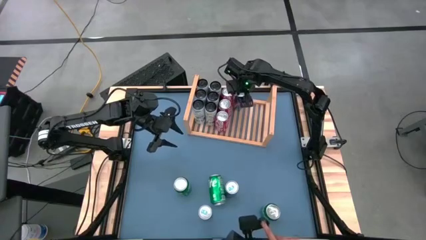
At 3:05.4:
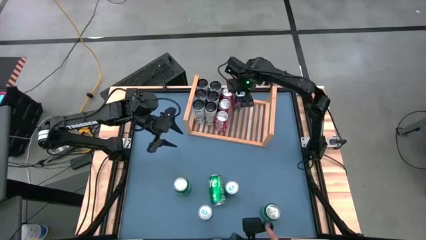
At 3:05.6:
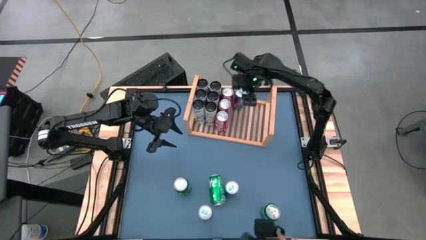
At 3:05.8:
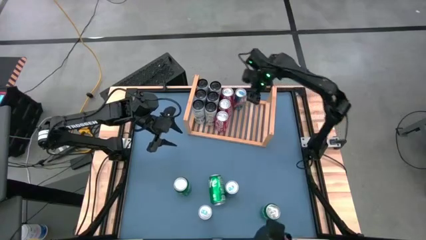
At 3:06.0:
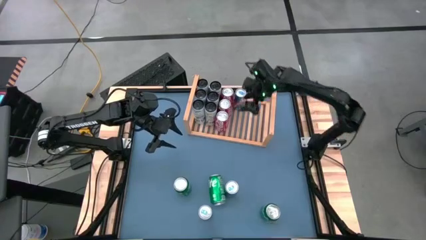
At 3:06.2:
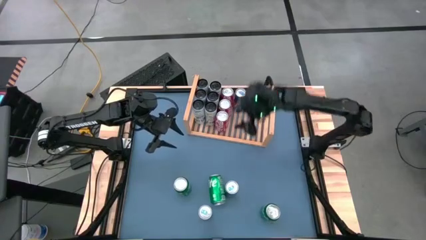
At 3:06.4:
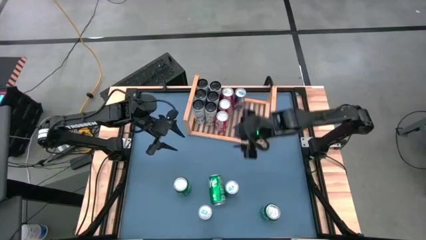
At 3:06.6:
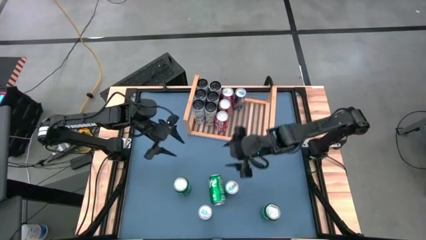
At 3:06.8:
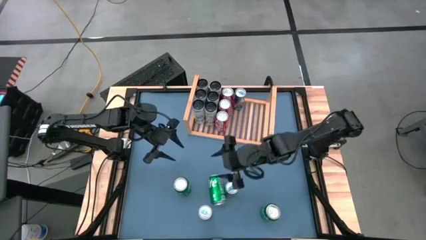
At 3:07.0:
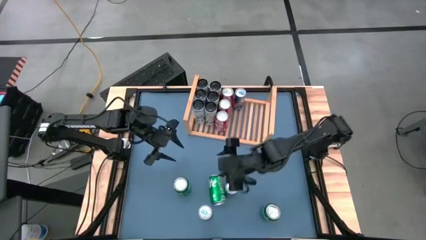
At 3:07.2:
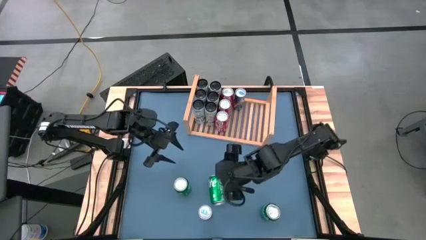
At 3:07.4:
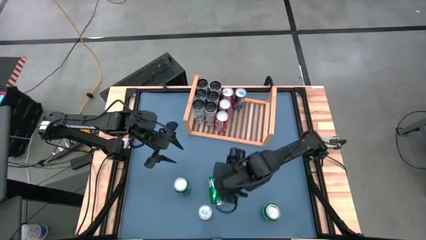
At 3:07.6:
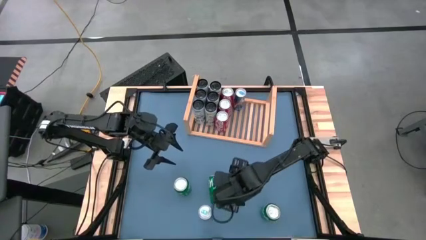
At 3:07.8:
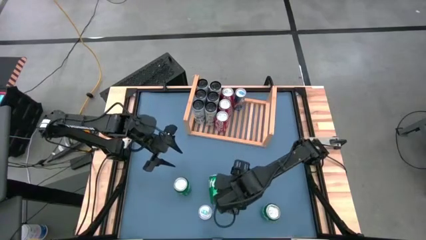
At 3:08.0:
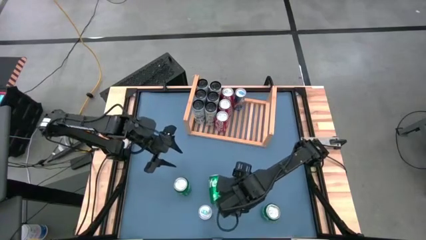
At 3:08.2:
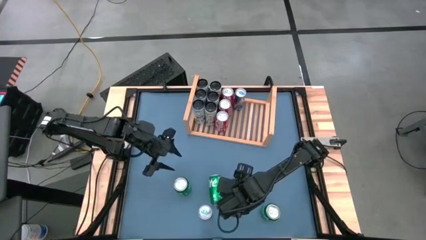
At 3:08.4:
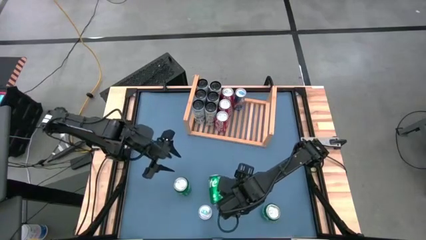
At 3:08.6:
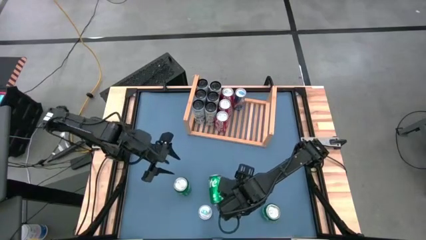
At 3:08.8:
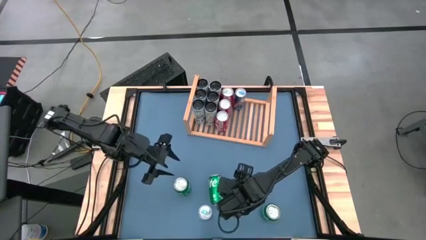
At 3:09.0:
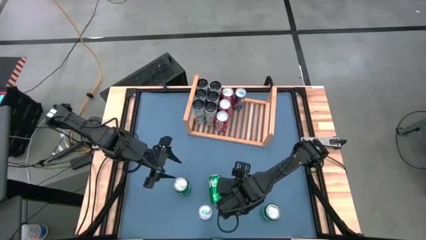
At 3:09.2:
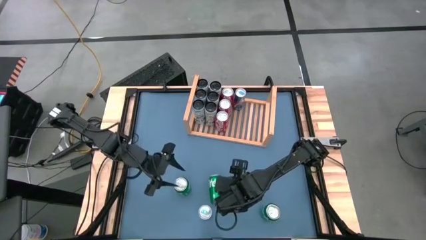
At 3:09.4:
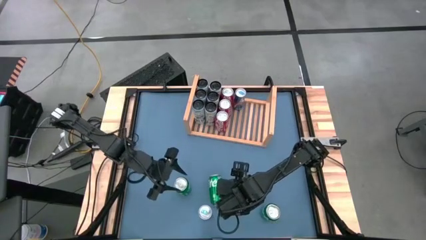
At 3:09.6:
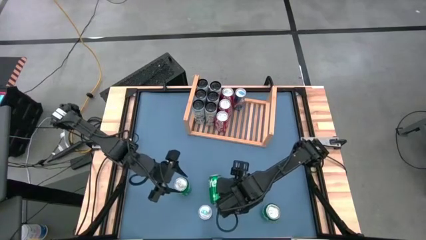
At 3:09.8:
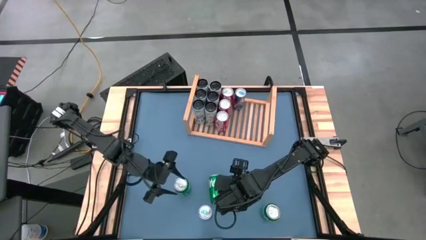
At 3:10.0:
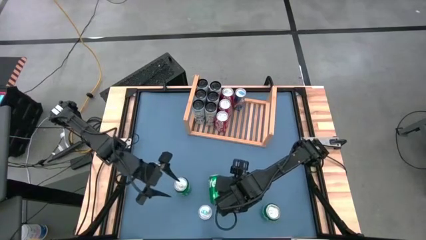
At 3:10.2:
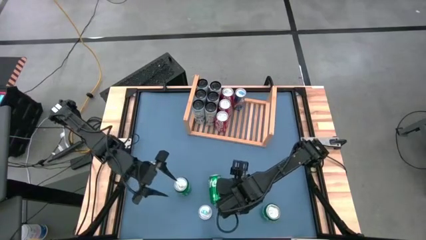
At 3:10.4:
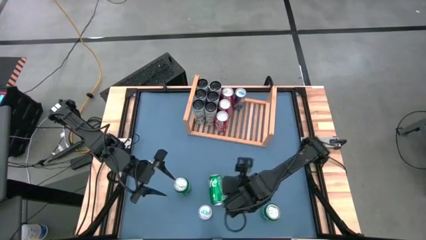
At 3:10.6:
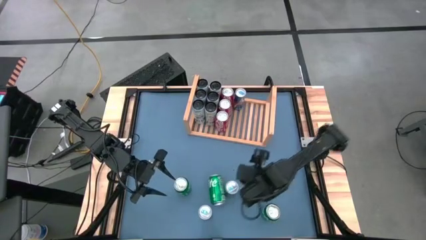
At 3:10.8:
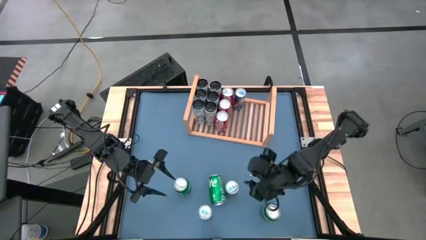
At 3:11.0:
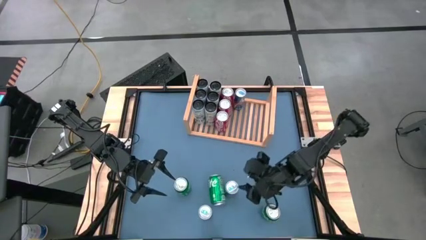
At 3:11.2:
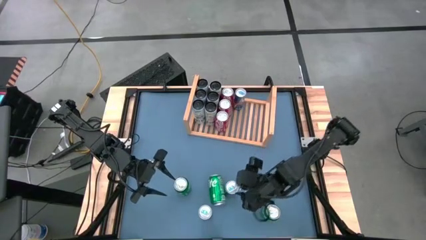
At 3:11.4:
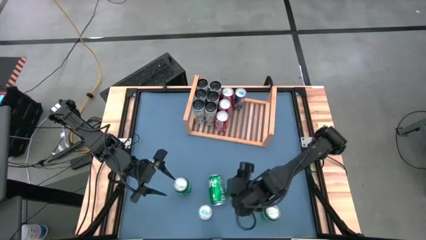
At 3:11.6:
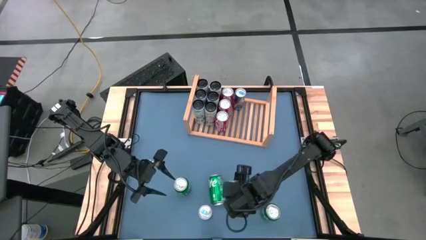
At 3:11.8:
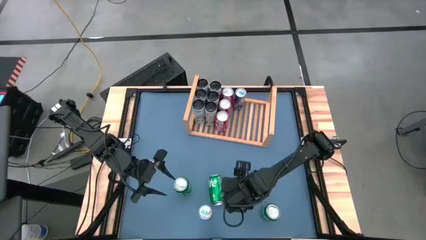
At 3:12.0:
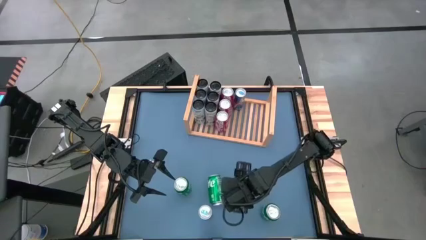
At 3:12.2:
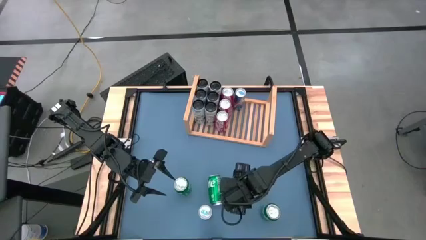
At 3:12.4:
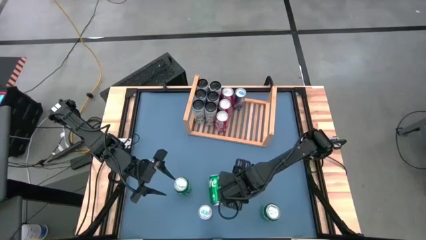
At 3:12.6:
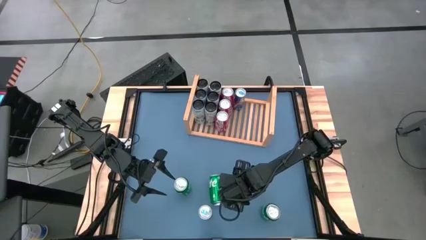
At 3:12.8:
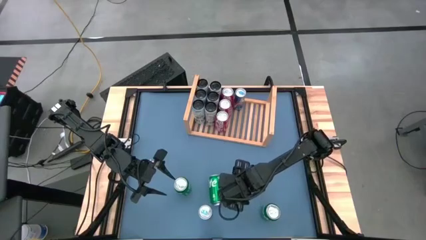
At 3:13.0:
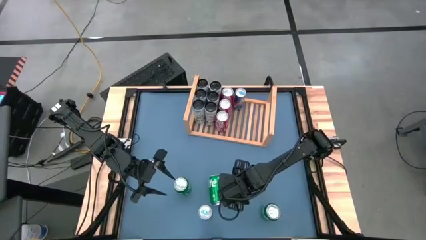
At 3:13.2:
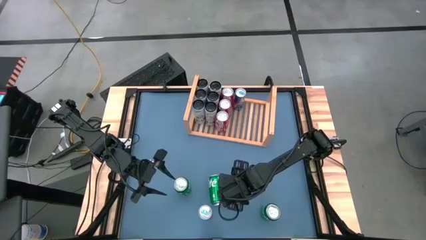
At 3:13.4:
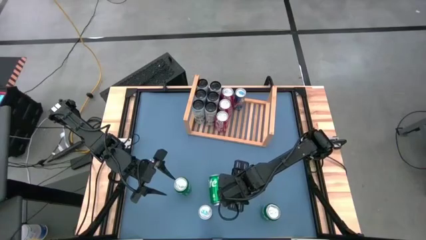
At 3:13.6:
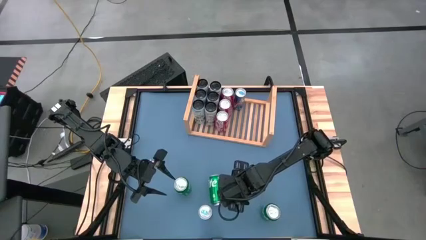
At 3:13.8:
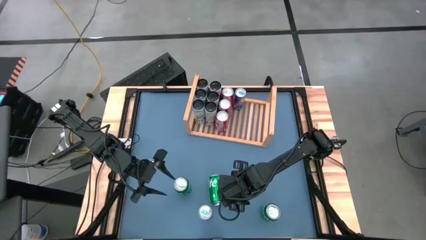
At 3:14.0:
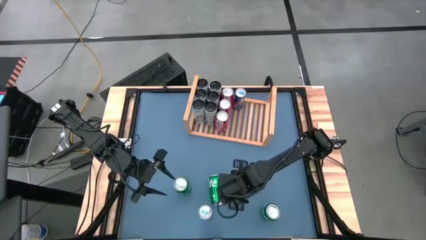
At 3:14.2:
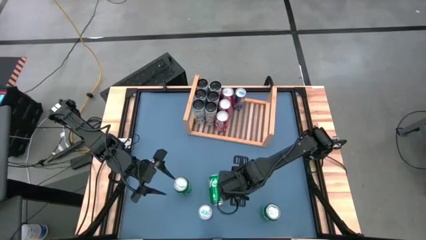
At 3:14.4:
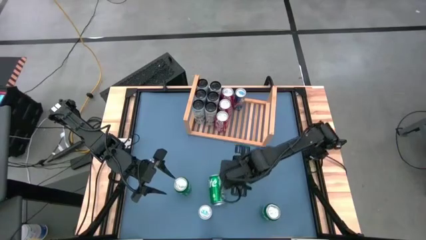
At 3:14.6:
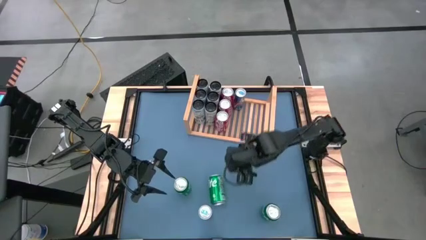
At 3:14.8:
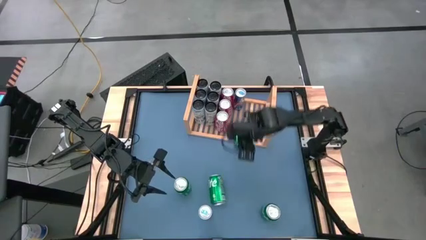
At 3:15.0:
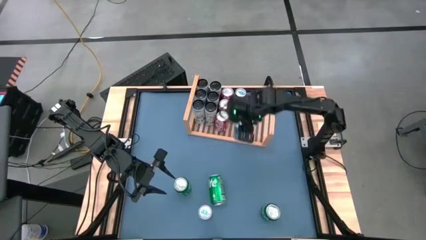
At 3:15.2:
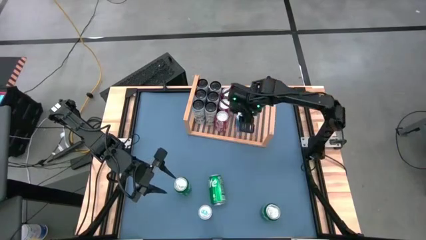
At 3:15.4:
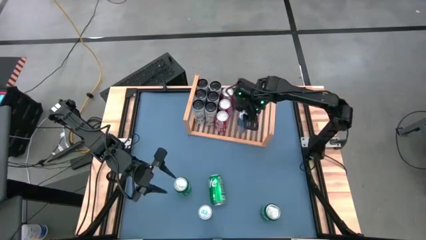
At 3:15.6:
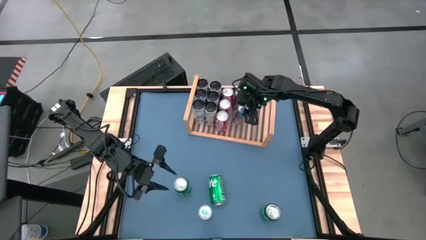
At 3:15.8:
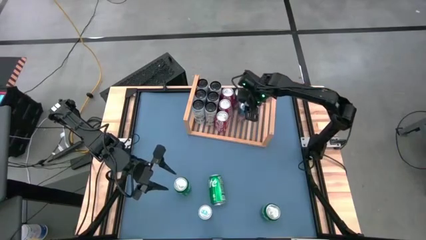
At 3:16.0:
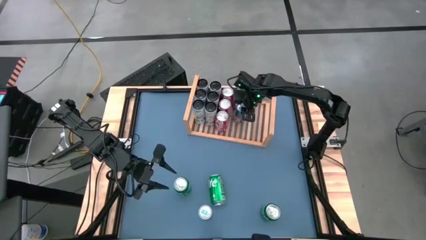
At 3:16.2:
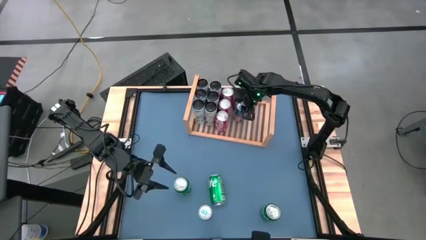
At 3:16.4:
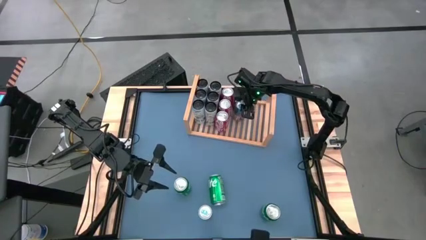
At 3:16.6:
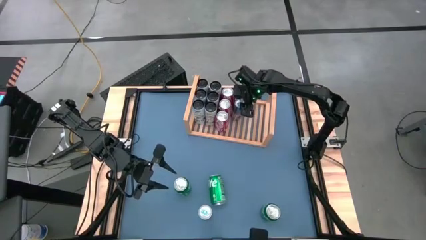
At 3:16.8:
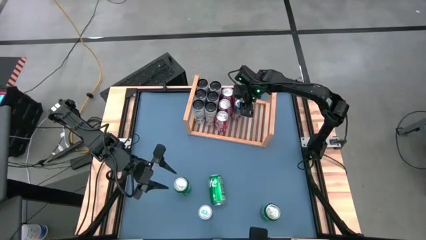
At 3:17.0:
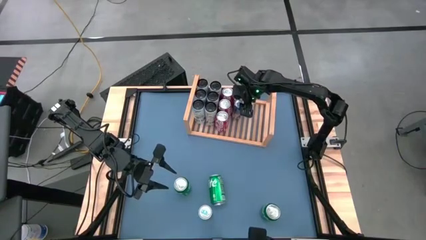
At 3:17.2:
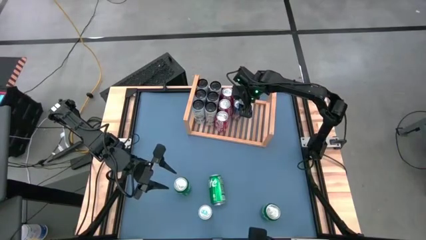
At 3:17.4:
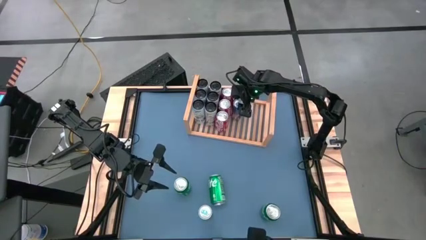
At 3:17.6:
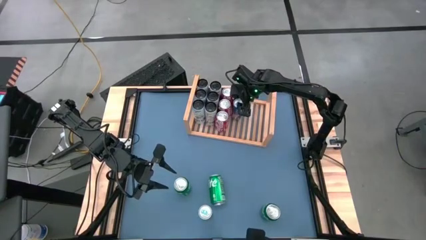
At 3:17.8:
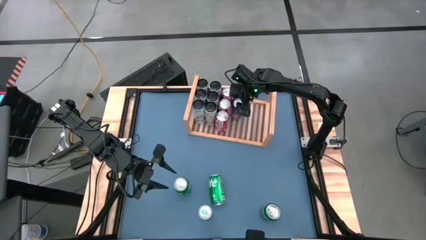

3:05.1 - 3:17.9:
Task: Place canned beverage on shelf
Put the blue soda can on the shelf aligned with the other blue soda can

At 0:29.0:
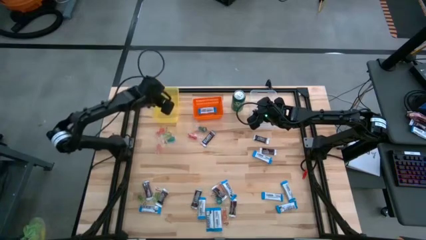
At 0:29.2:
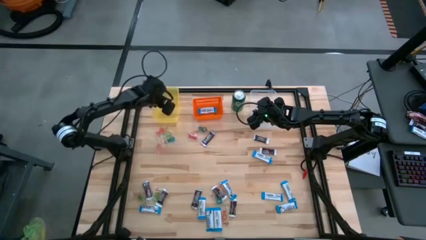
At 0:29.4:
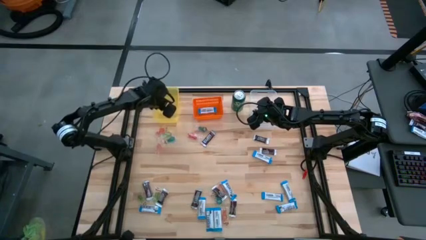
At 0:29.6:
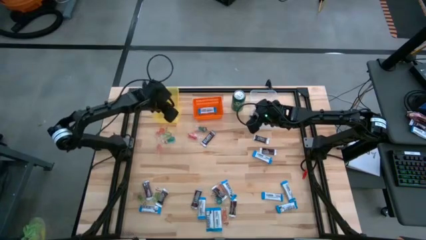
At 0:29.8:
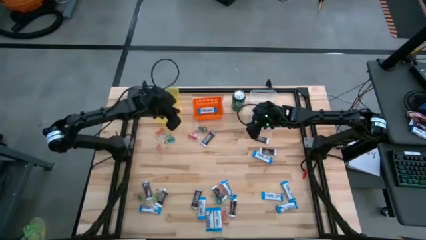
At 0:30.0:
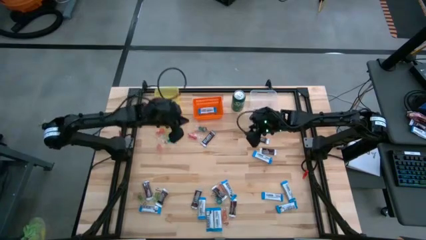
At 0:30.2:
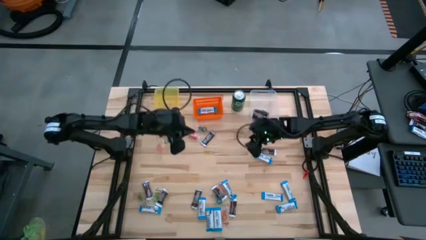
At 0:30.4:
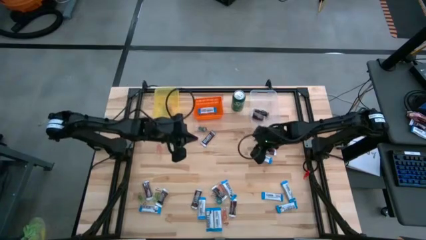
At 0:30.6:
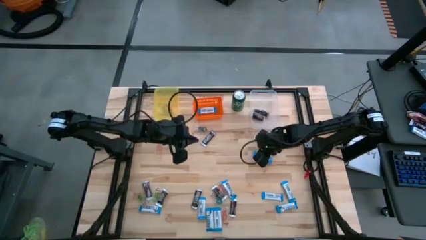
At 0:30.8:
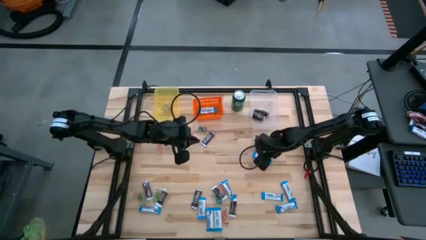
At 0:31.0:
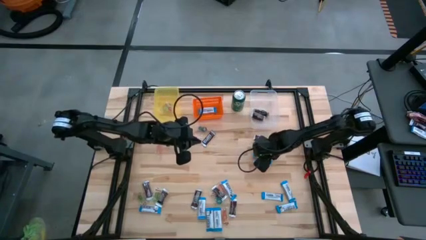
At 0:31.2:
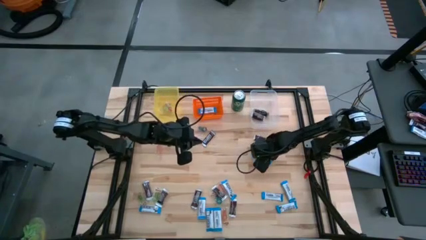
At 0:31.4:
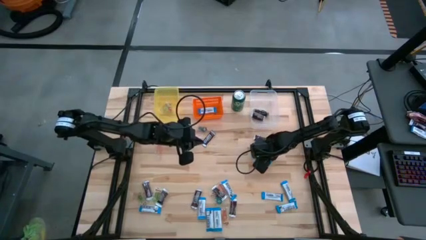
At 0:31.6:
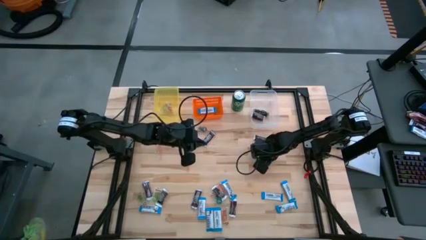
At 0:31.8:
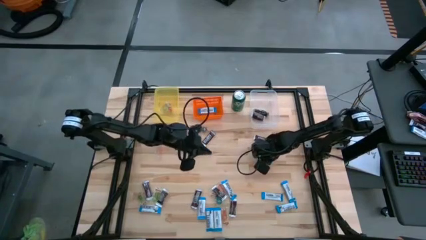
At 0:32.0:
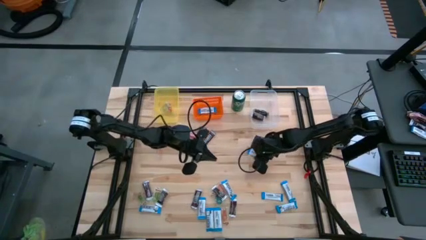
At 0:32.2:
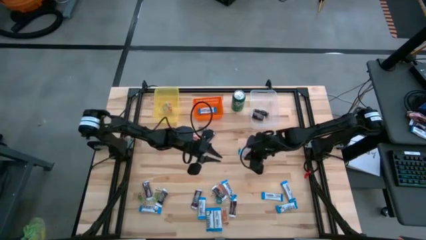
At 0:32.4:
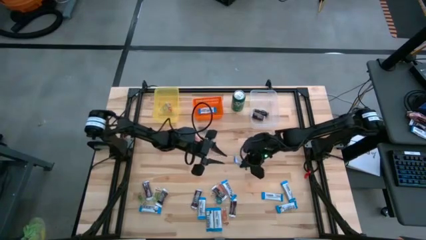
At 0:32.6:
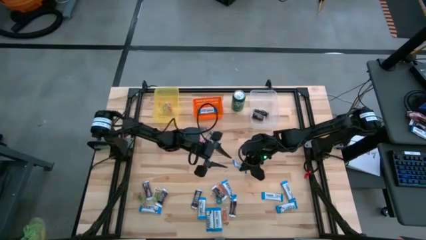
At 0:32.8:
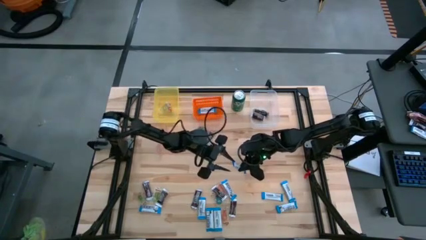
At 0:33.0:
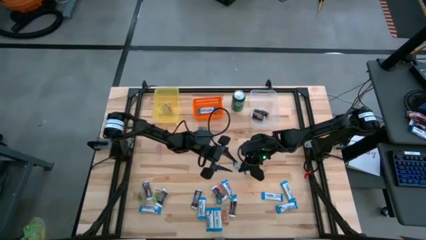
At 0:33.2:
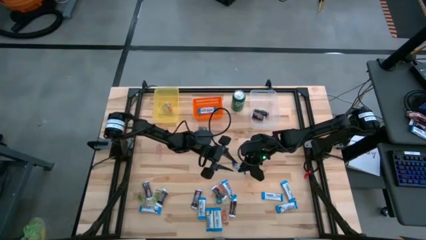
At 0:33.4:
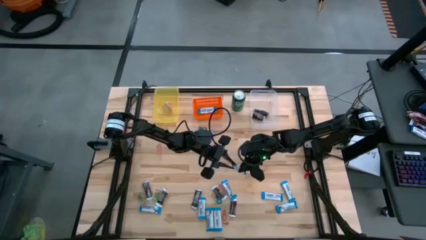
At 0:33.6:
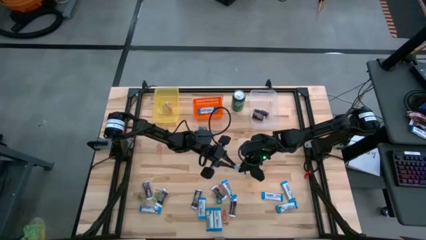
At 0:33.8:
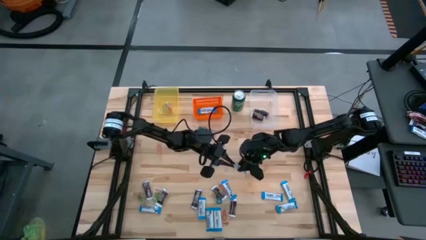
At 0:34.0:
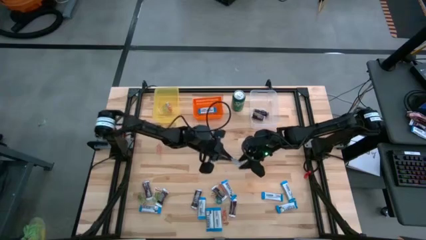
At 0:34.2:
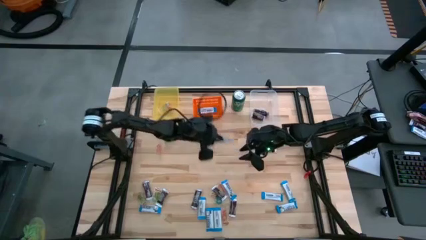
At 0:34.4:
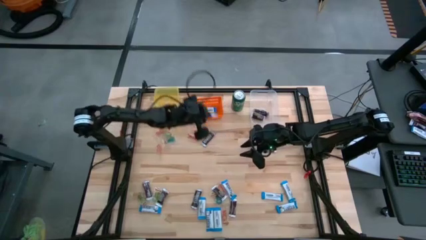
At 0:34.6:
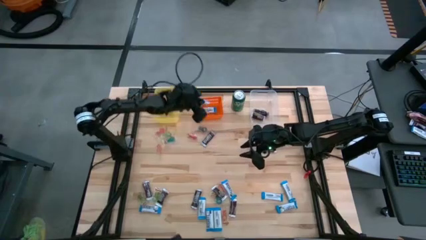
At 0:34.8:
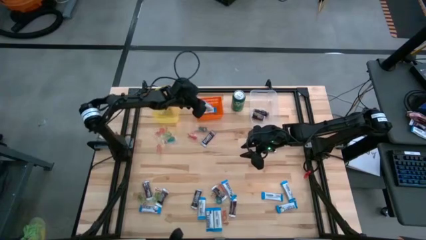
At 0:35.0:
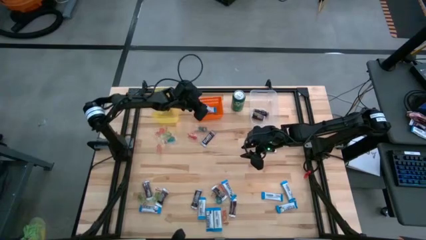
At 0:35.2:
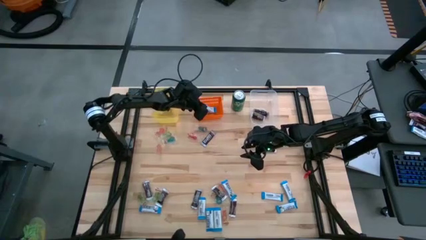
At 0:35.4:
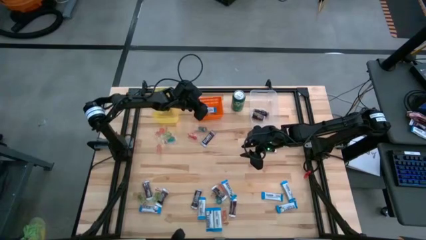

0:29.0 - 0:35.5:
Task: Organize candy in baskets
Put the white chocolate into the orange bin
